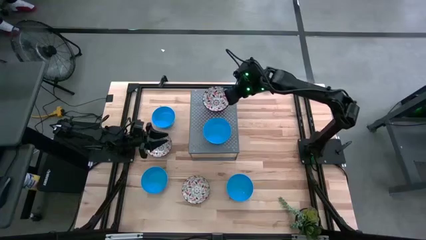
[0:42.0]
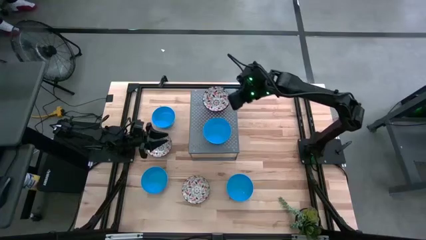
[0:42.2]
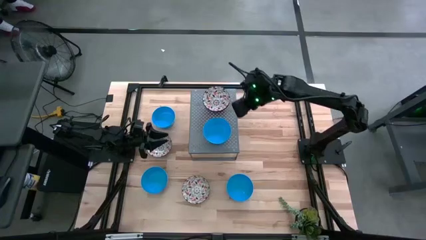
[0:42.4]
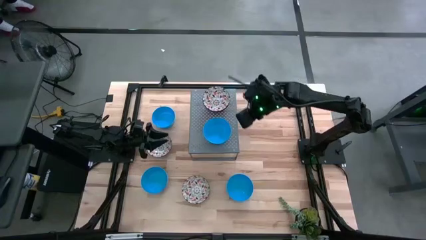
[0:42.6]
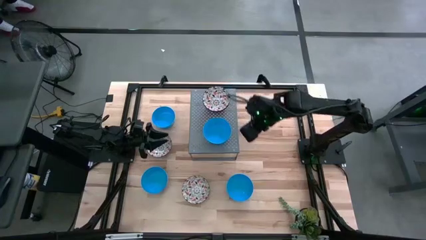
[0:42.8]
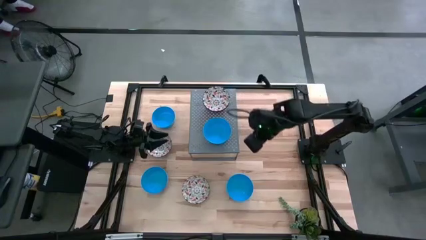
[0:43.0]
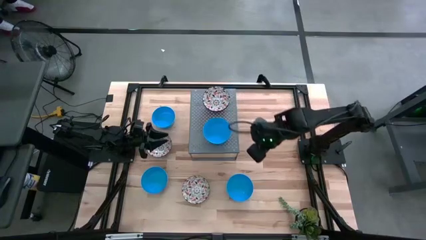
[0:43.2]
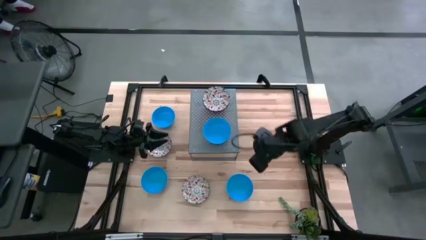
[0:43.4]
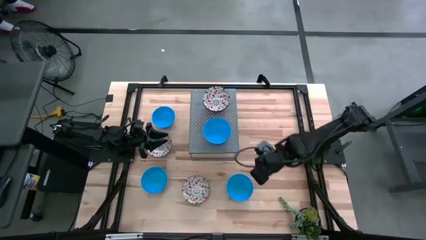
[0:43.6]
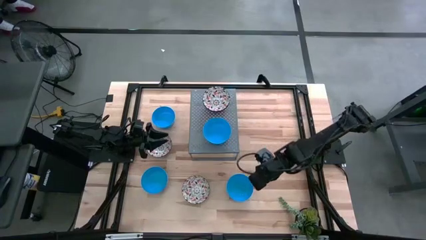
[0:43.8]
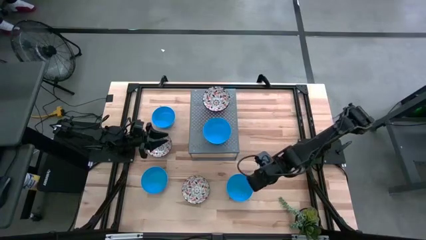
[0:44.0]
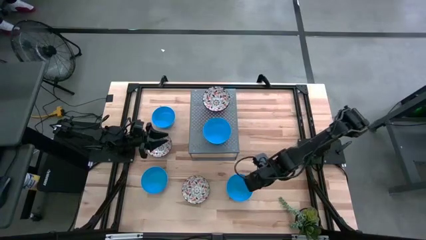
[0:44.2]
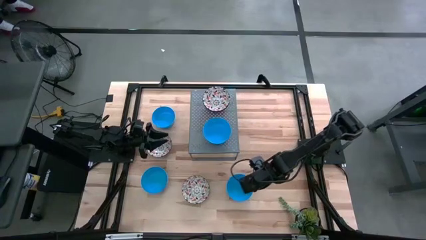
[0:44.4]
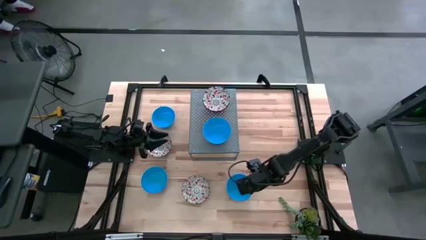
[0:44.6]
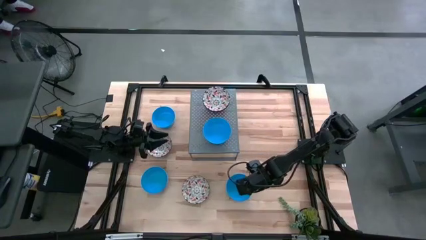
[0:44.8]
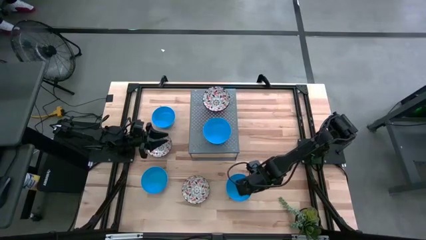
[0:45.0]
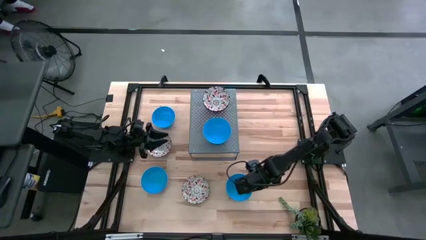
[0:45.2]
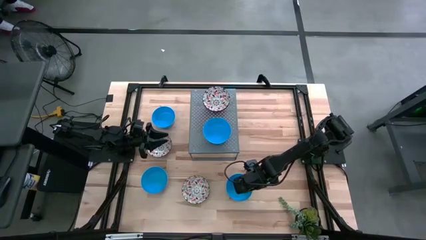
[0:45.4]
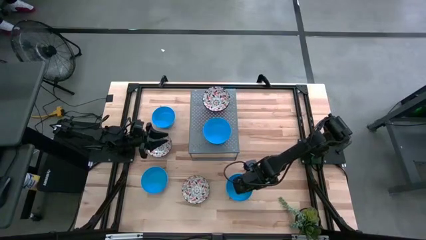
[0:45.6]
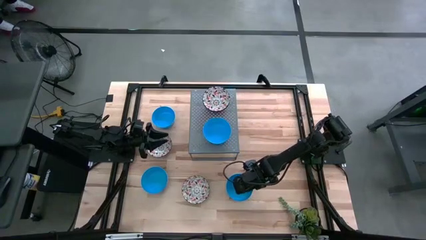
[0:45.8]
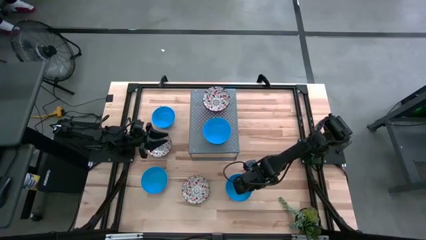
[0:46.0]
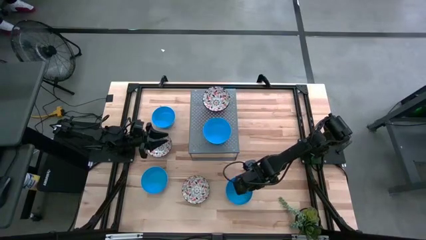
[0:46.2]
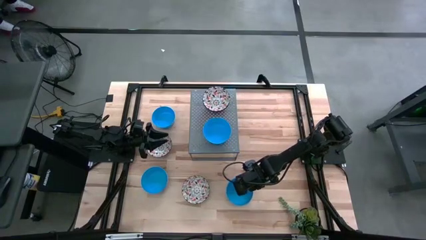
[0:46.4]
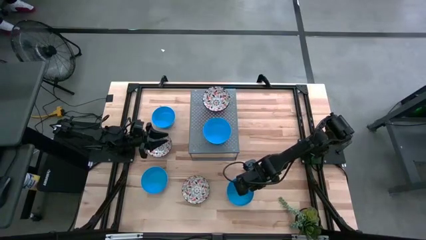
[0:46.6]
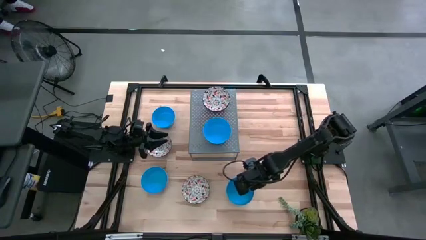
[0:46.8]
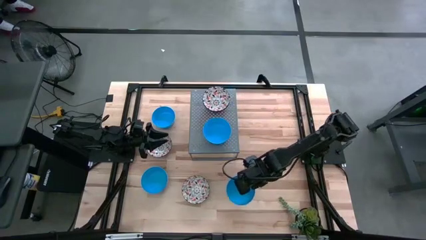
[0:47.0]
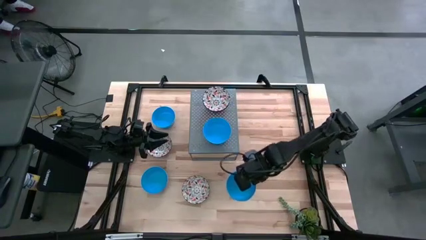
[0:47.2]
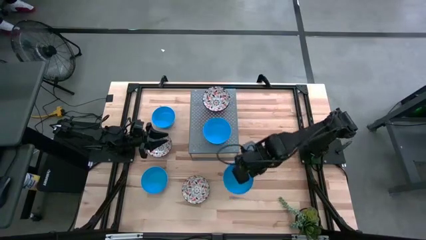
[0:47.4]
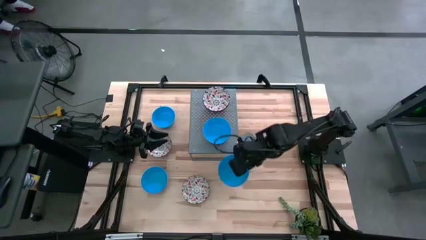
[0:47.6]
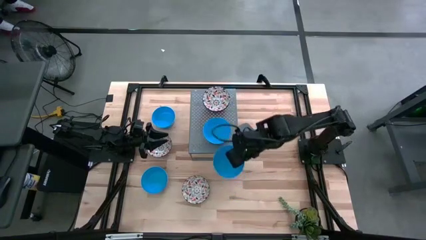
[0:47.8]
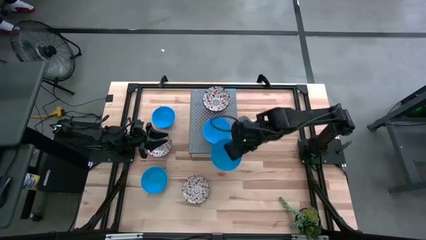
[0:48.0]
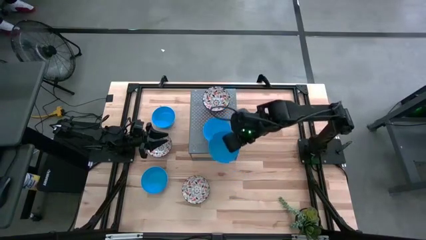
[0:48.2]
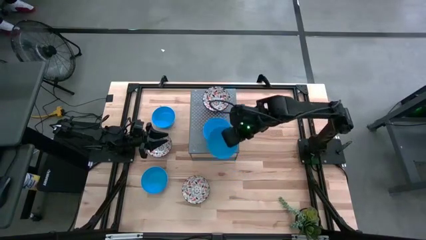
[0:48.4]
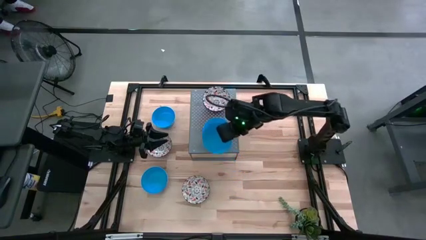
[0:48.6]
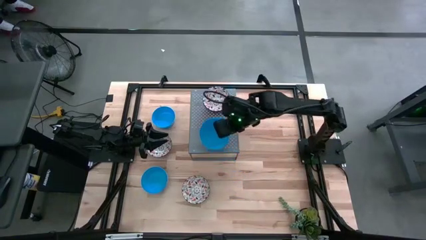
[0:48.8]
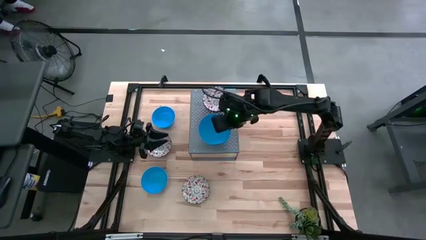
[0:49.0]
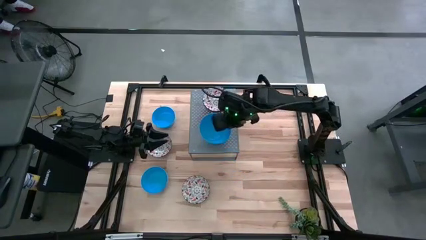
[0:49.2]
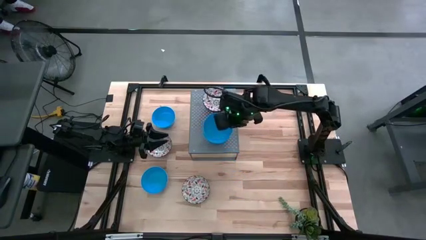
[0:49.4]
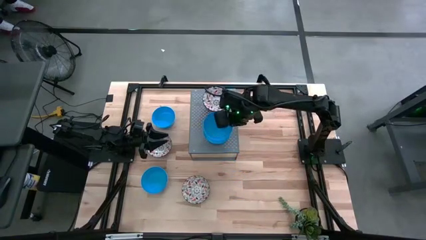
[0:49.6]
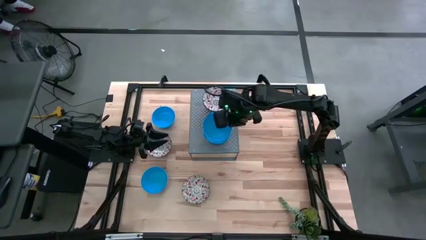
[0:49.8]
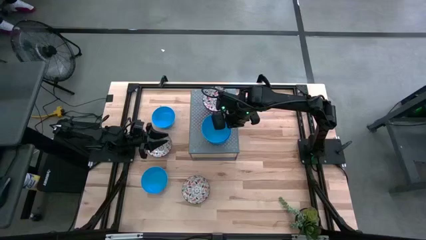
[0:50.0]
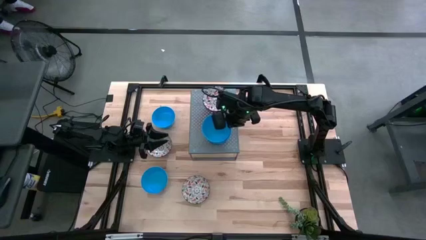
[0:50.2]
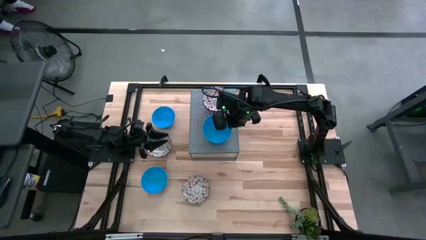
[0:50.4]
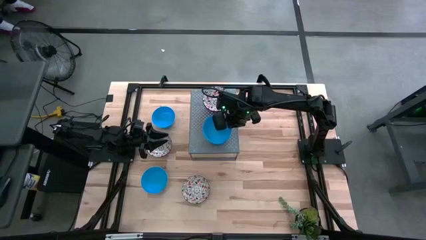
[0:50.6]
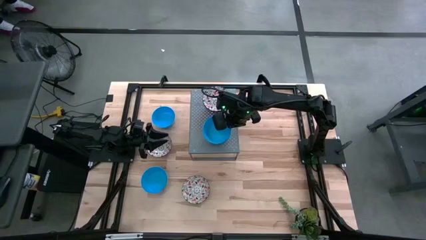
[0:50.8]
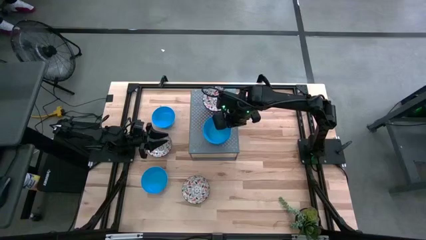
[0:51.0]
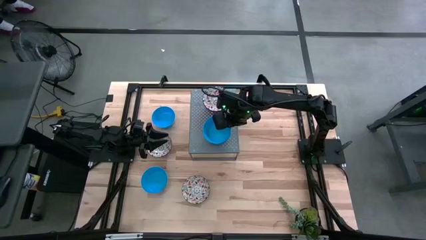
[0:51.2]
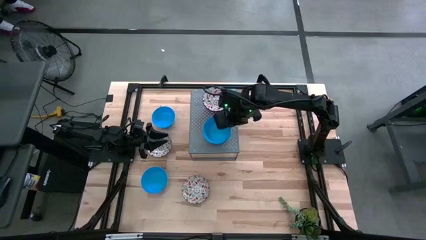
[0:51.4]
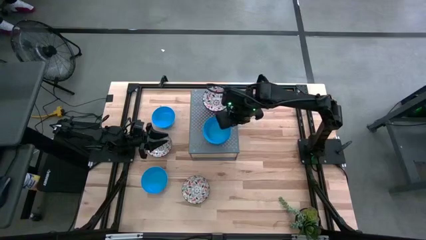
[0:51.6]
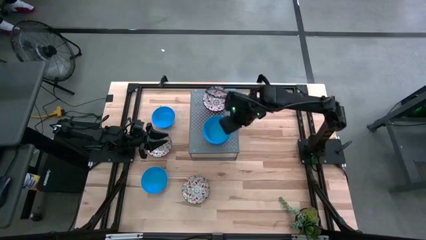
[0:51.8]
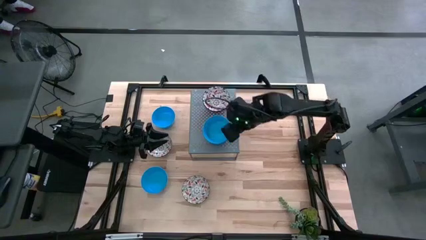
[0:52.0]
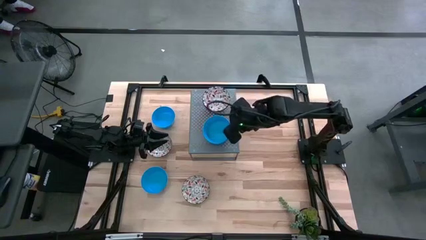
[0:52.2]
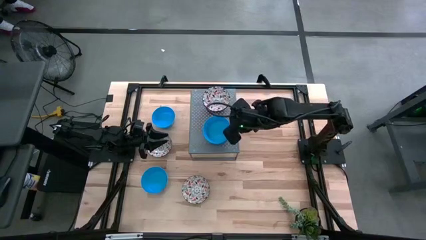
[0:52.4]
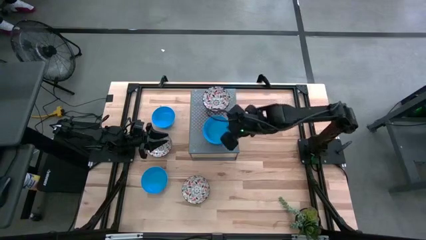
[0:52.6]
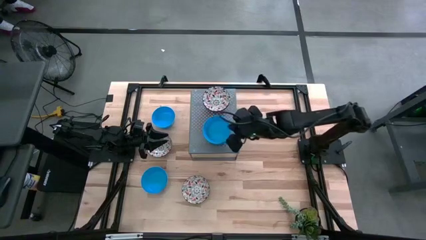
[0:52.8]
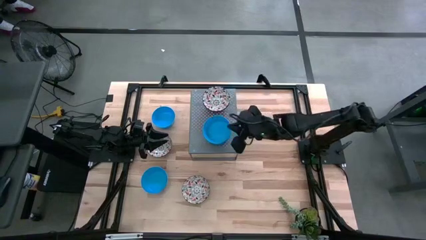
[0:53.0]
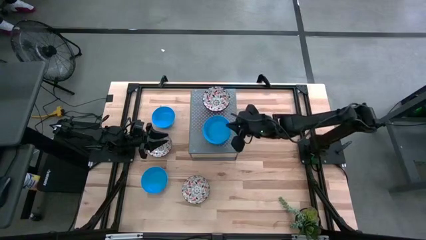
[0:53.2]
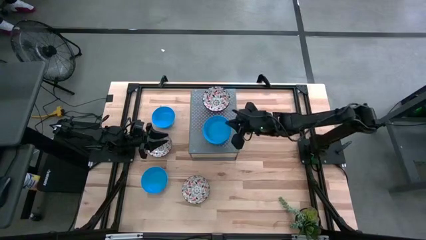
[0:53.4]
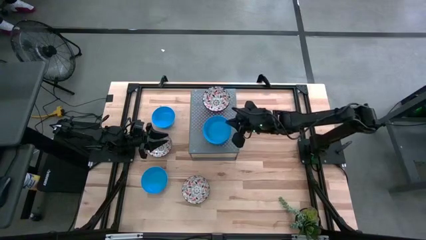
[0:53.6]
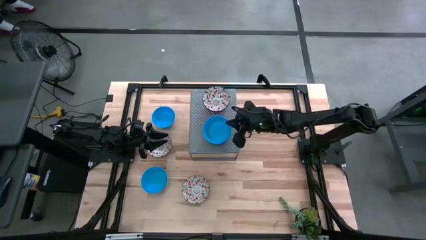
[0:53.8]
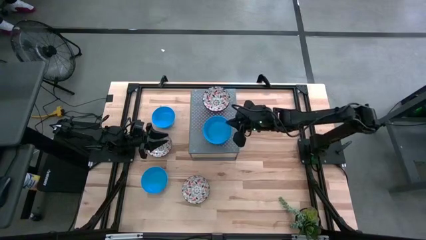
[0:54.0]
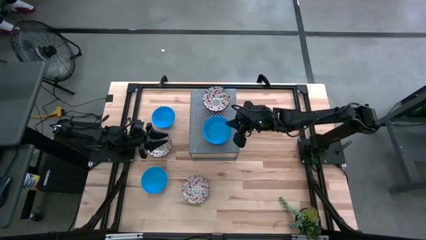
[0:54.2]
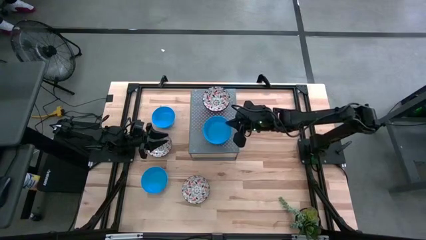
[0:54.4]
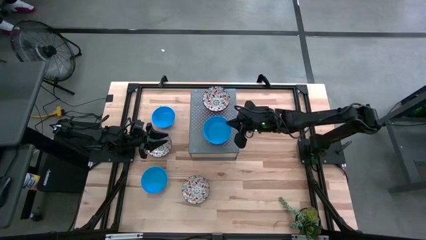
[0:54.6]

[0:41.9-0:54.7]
Task: Pick & Place Mini bowls
Stack the blue bowl on the blue bowl on the shelf
